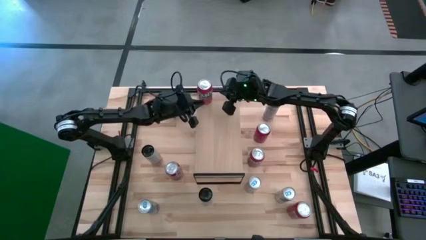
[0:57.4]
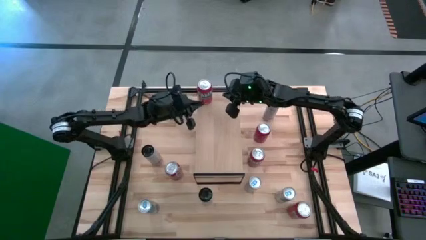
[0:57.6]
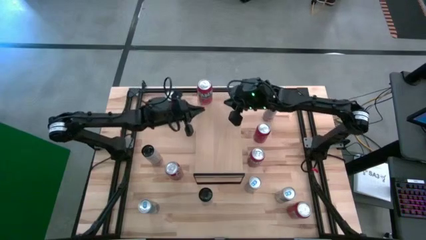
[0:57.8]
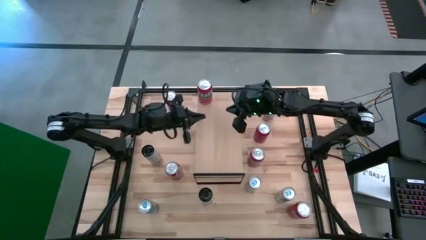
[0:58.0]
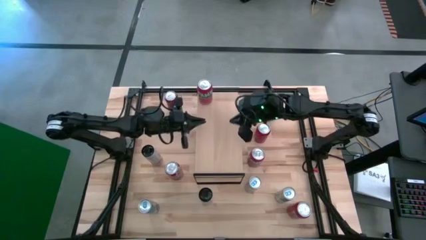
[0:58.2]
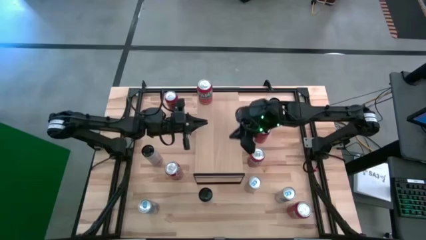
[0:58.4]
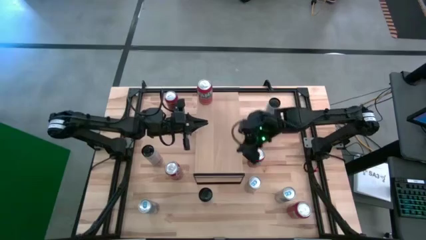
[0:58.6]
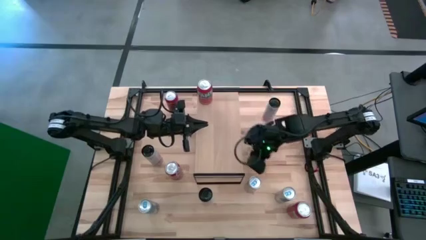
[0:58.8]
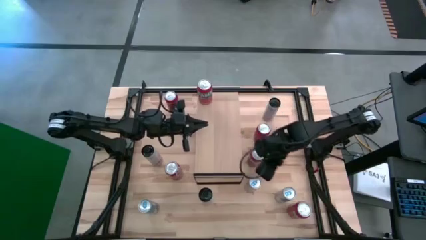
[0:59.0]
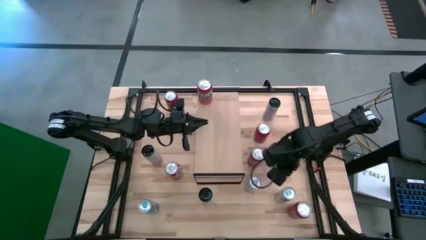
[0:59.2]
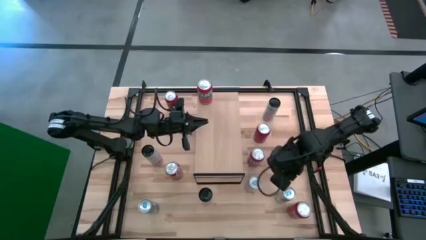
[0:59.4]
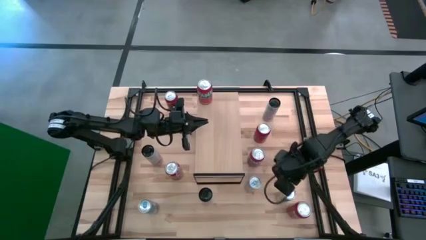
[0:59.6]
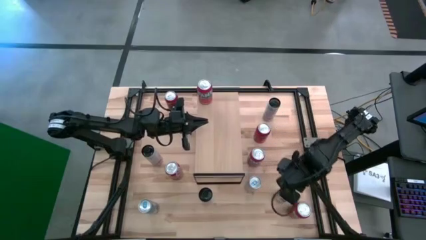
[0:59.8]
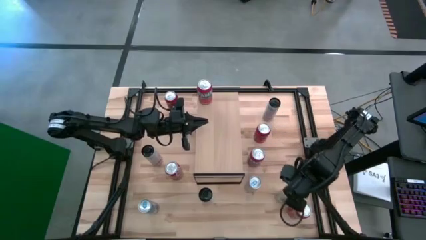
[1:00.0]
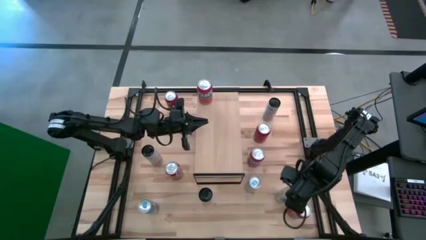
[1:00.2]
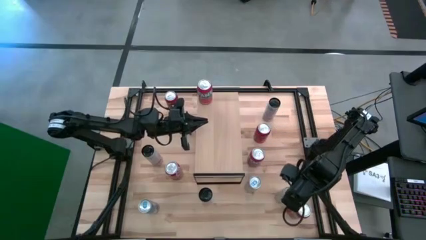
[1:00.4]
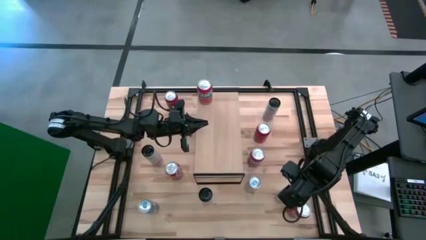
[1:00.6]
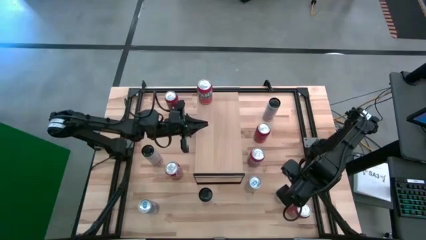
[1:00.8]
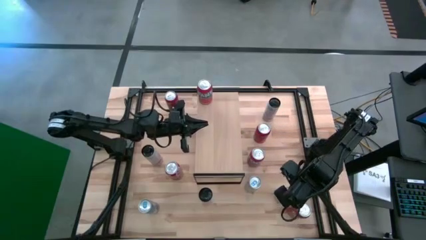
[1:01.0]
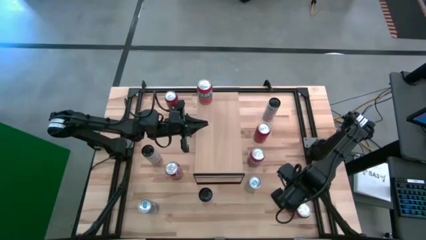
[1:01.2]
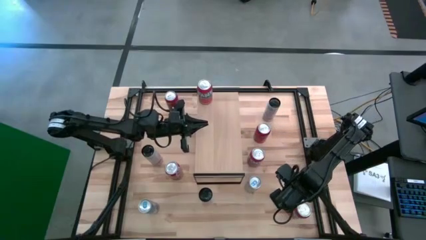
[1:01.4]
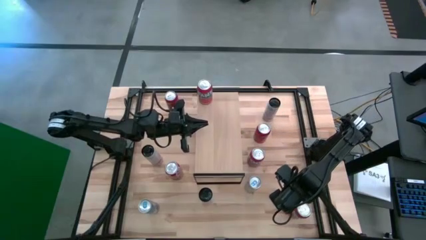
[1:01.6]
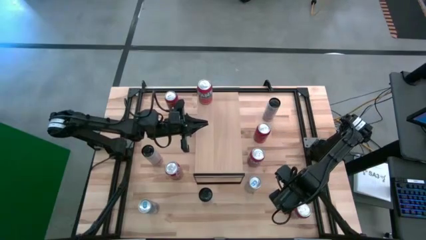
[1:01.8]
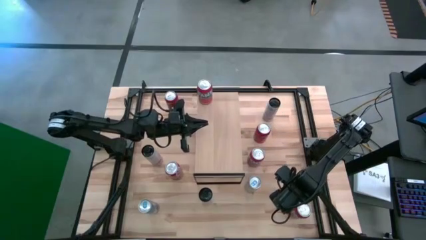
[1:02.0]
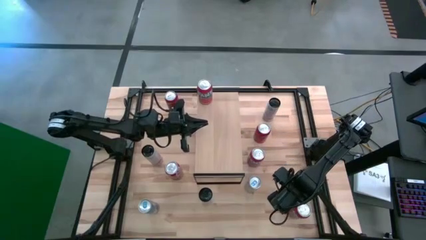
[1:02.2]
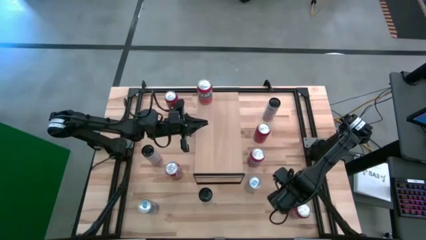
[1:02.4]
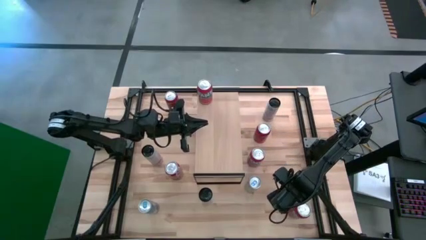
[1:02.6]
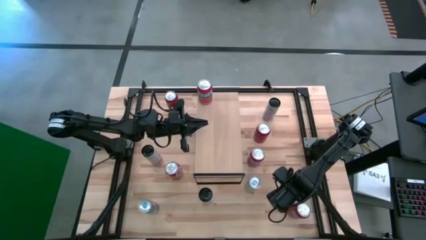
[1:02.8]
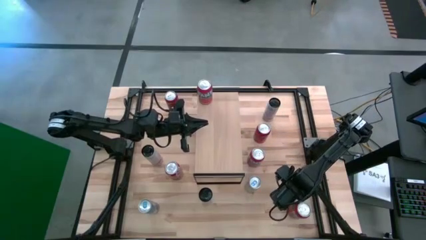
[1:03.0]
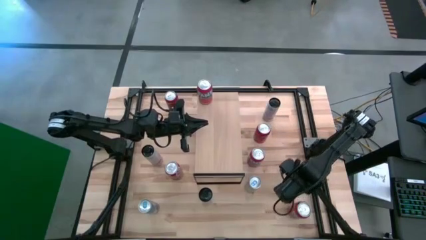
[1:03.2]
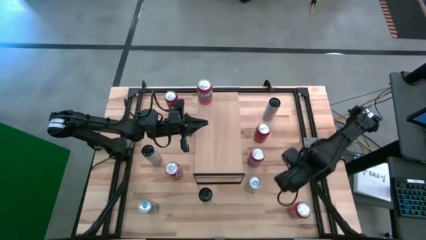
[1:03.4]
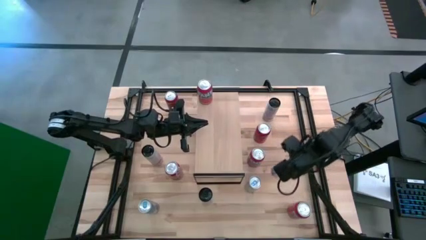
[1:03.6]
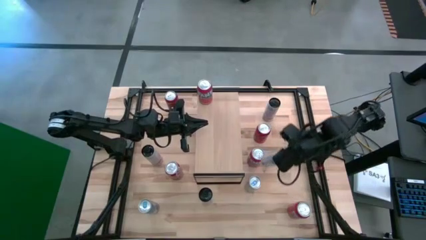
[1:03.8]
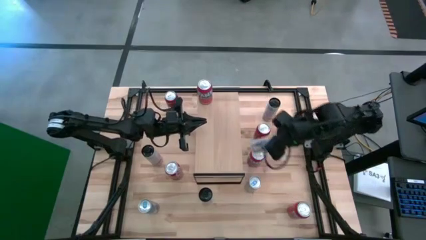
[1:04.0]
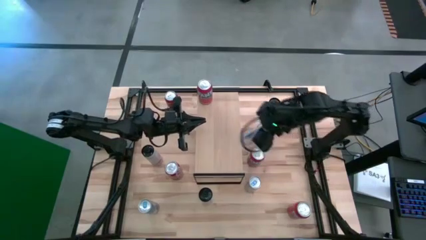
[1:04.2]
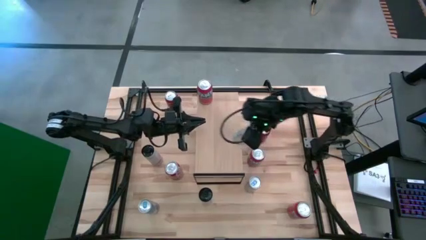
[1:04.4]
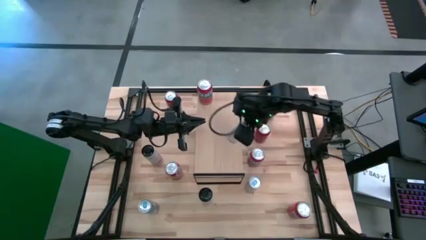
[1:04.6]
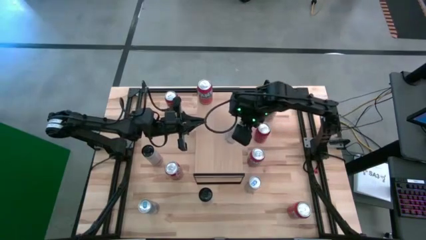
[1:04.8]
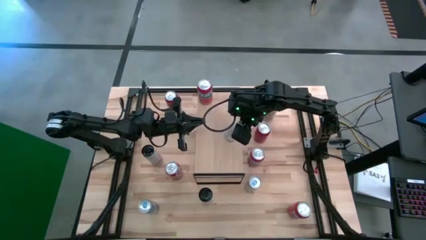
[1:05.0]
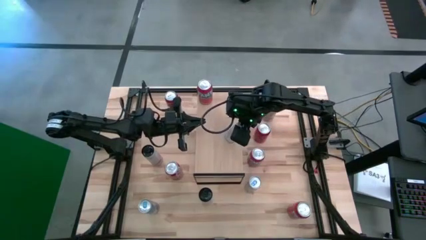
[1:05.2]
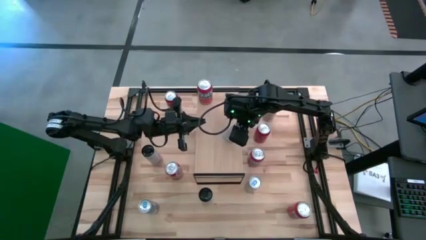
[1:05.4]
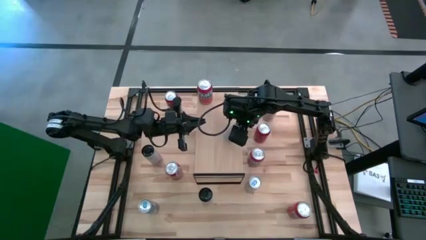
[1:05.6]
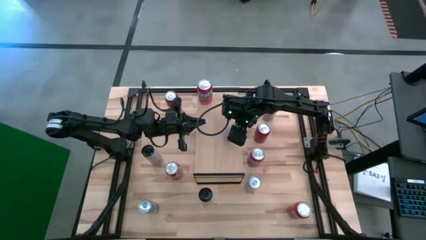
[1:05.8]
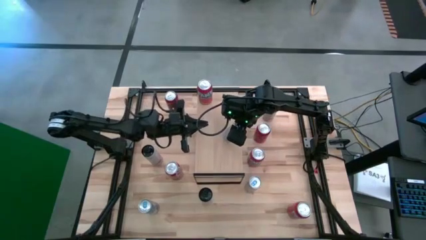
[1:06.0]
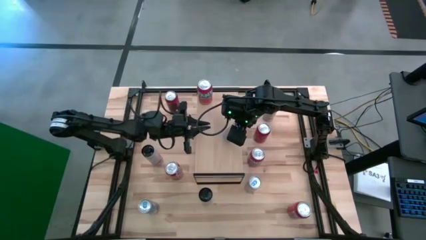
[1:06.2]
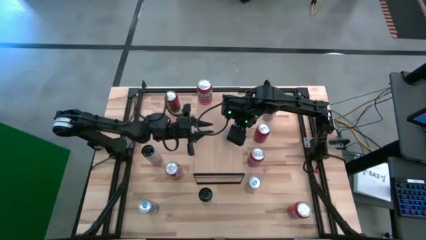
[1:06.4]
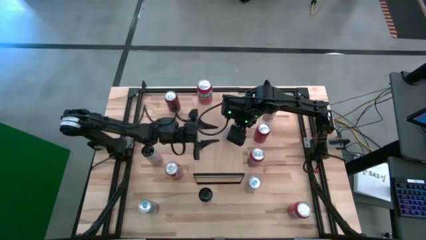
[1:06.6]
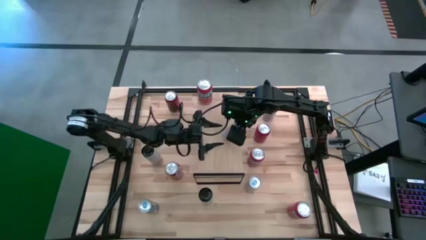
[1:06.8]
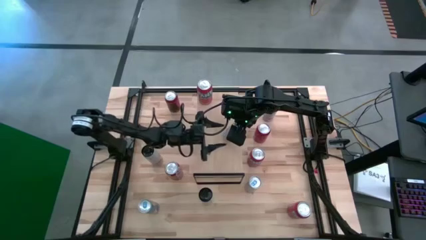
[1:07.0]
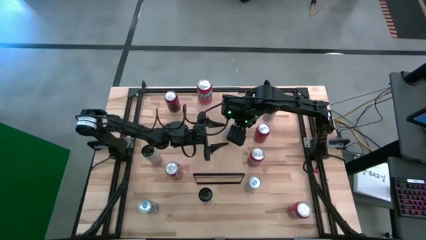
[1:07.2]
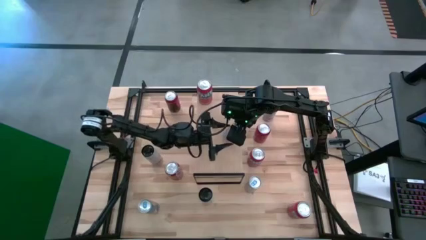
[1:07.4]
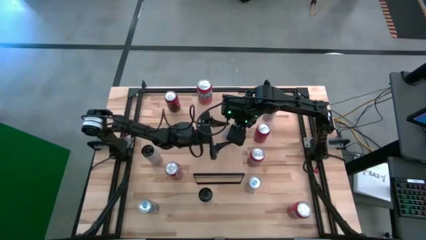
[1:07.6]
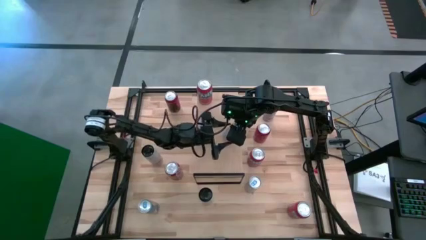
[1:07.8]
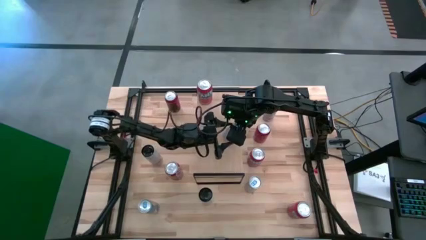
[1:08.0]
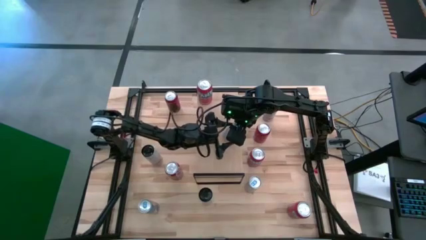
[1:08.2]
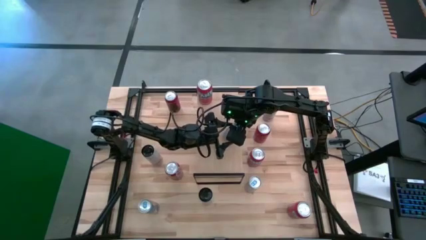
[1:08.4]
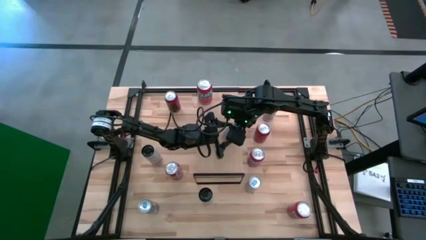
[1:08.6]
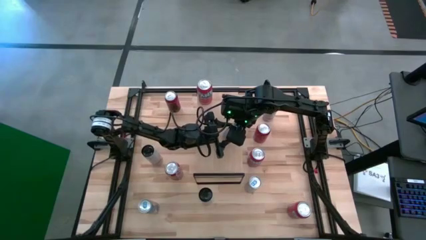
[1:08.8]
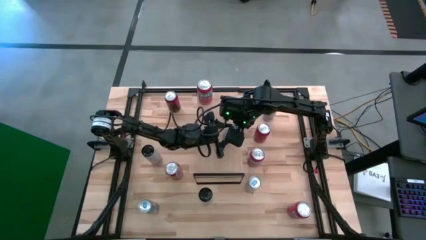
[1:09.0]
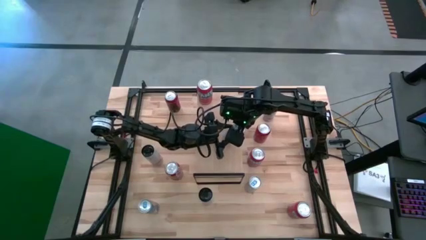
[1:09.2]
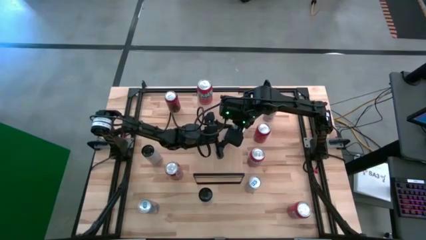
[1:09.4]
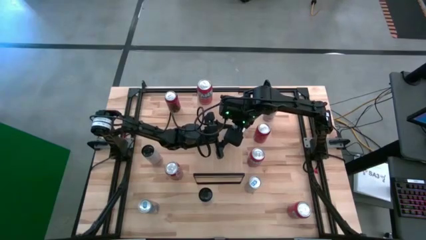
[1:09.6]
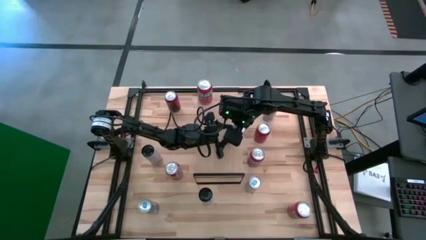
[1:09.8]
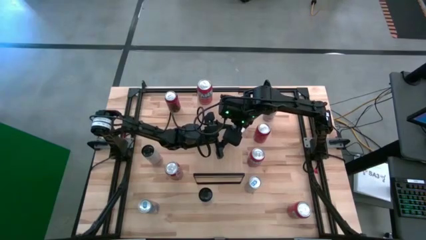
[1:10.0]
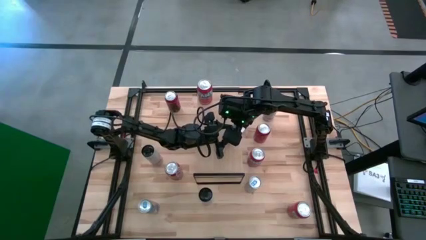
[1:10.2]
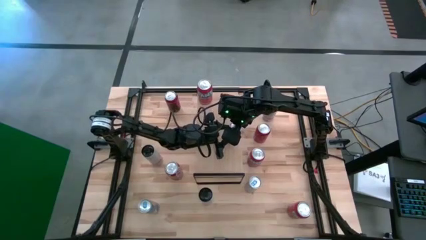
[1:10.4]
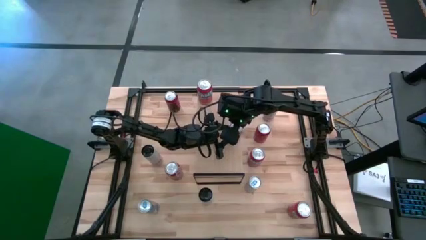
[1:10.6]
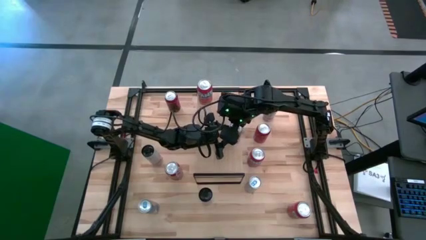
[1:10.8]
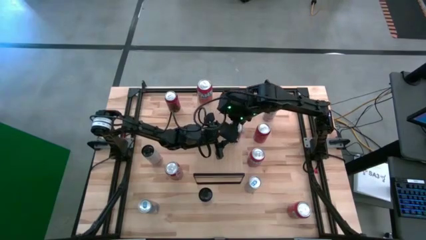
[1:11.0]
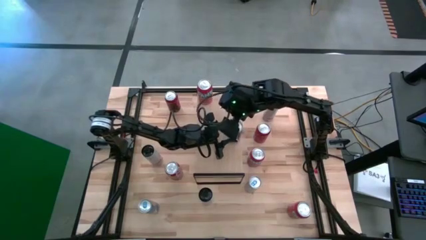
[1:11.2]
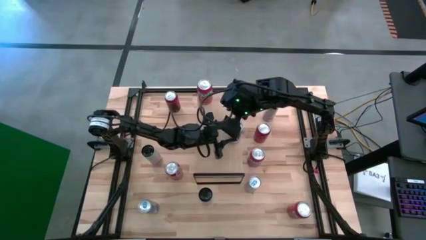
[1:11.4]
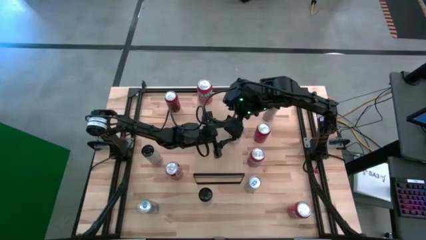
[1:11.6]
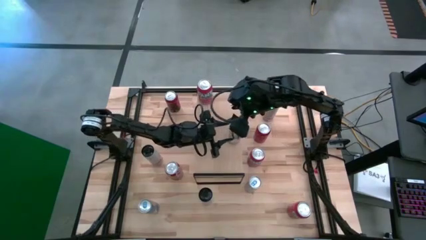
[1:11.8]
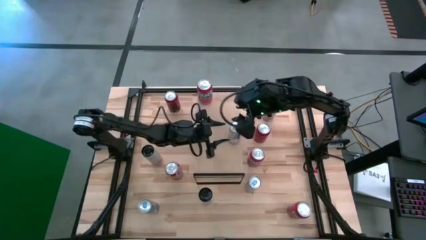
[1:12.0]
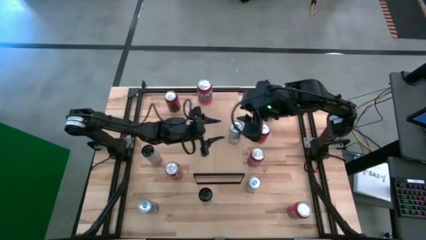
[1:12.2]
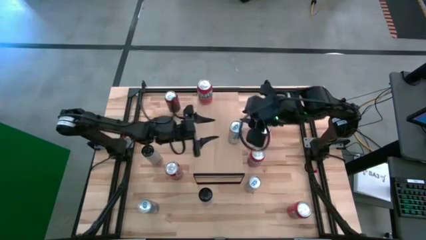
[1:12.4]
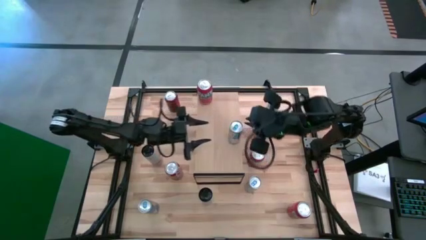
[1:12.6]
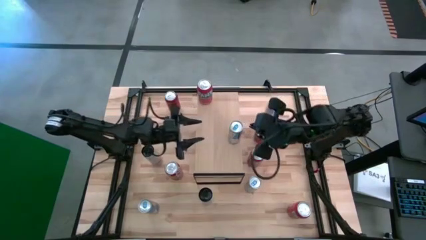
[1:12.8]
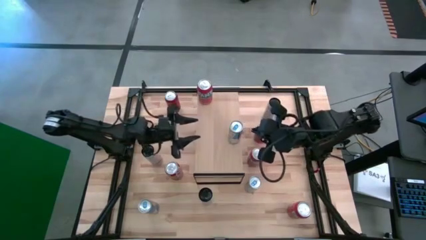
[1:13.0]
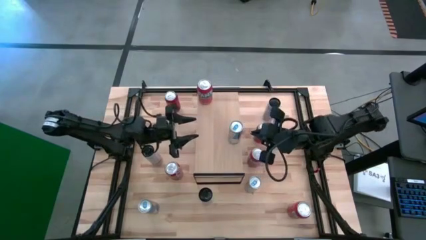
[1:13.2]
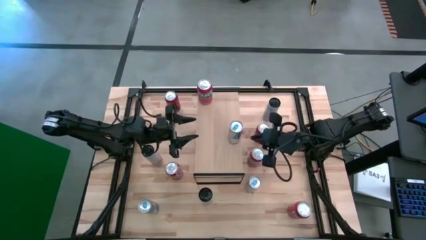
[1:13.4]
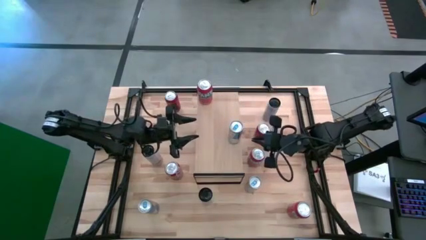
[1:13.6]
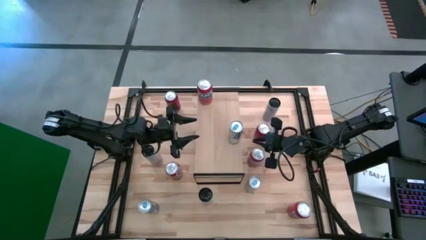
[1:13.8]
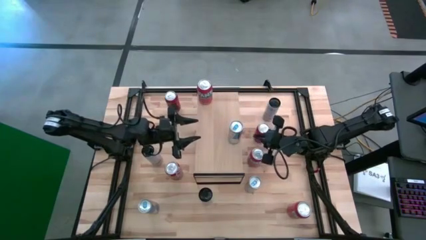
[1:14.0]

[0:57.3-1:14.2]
Task: Place canned beverage on shelf
Put the bottom right blue soda can on the shelf
